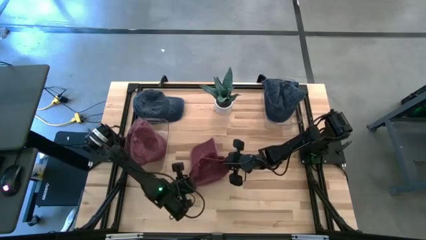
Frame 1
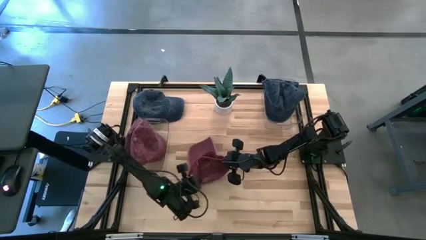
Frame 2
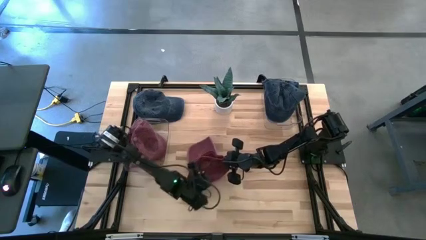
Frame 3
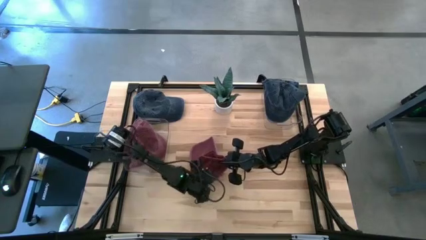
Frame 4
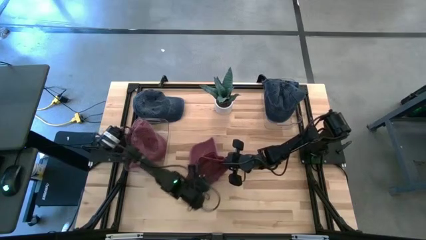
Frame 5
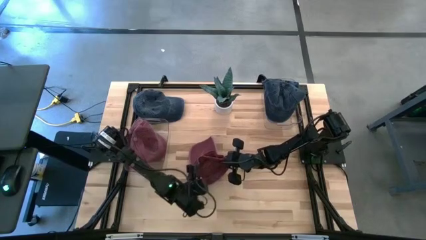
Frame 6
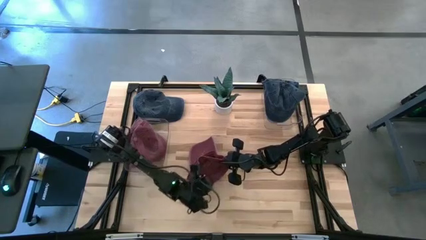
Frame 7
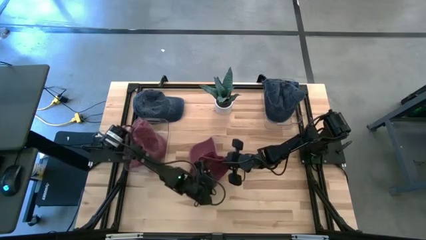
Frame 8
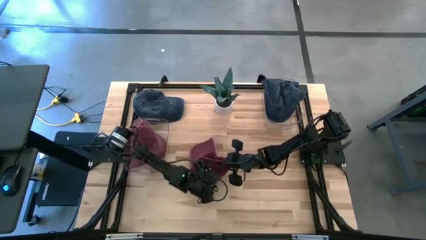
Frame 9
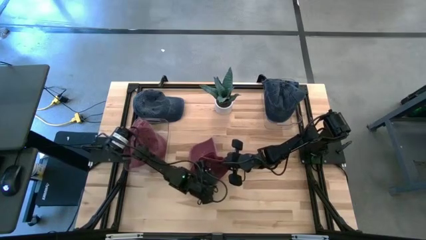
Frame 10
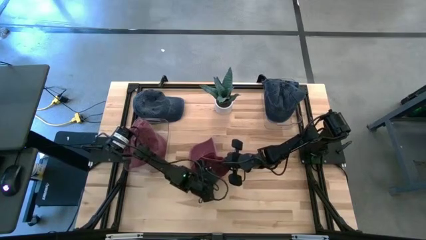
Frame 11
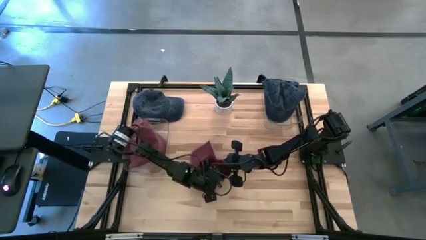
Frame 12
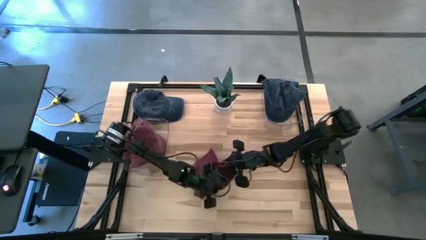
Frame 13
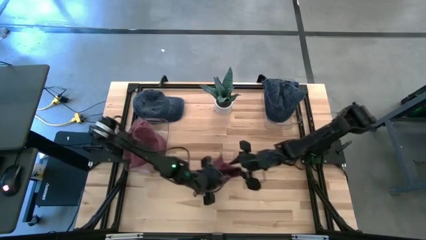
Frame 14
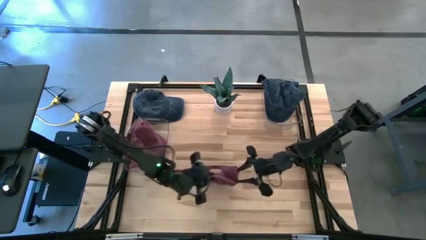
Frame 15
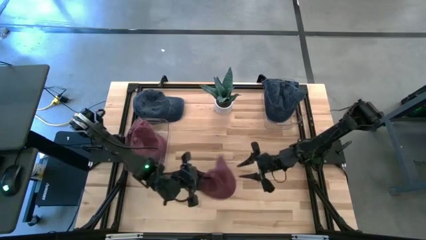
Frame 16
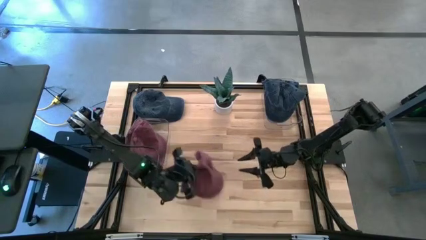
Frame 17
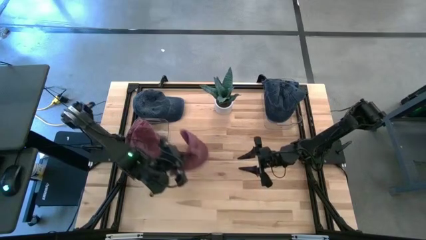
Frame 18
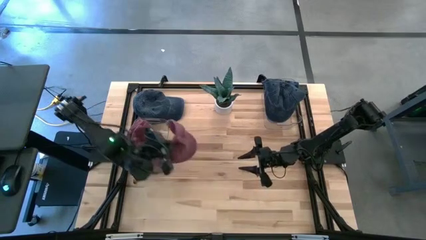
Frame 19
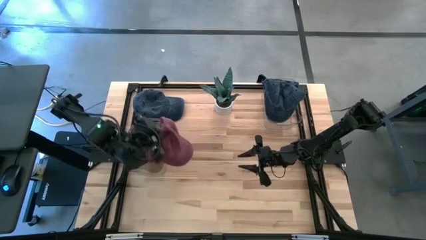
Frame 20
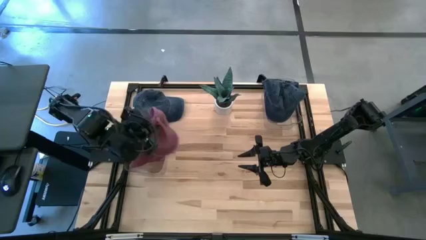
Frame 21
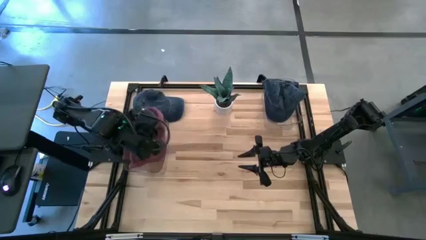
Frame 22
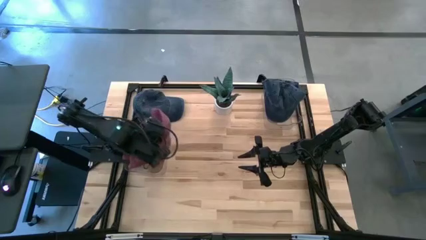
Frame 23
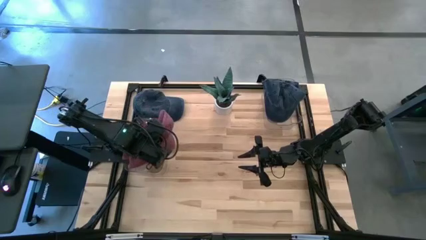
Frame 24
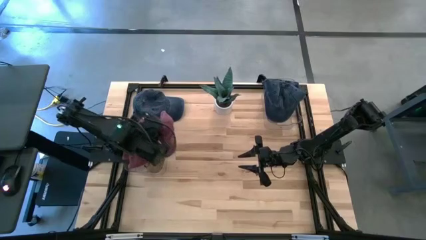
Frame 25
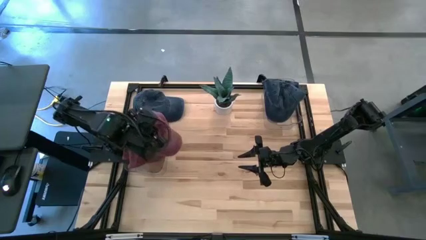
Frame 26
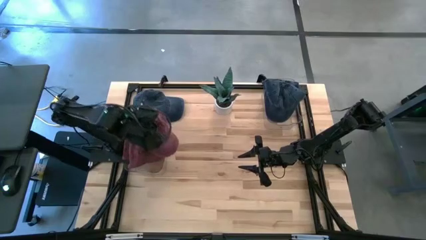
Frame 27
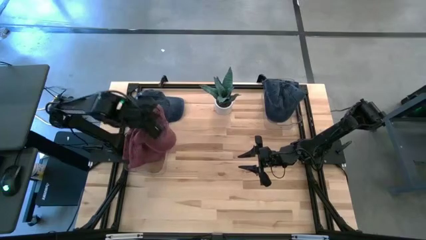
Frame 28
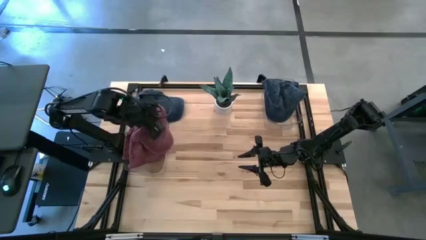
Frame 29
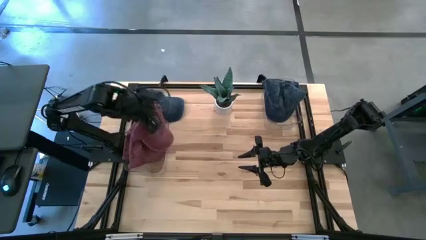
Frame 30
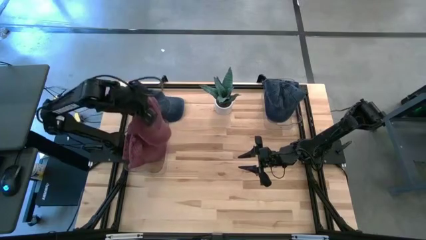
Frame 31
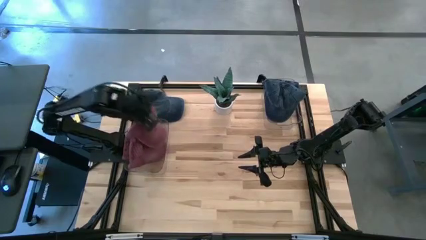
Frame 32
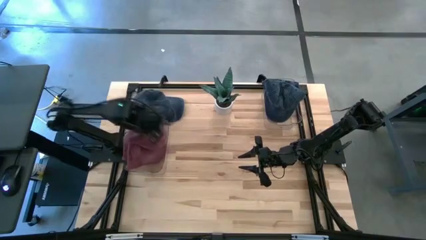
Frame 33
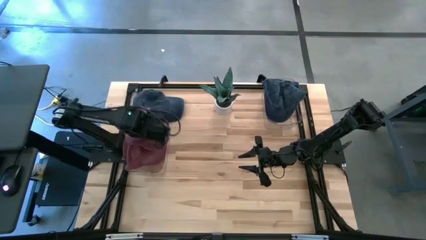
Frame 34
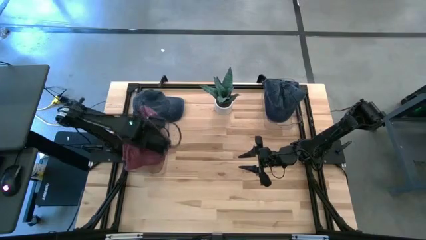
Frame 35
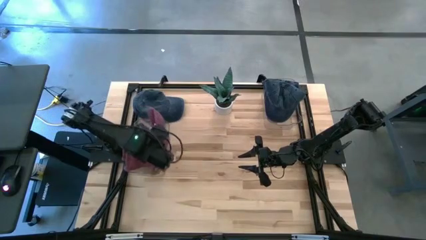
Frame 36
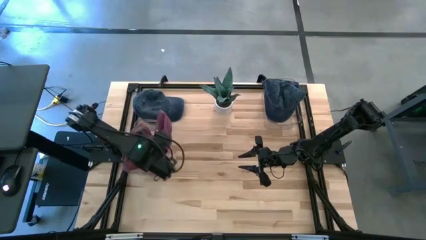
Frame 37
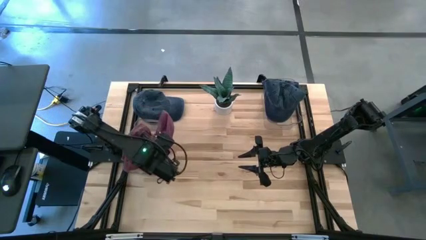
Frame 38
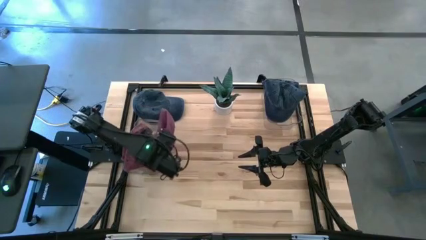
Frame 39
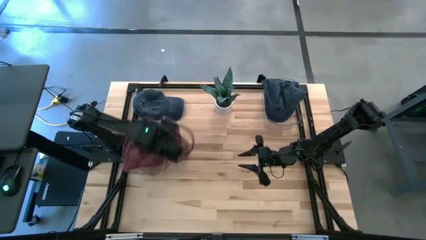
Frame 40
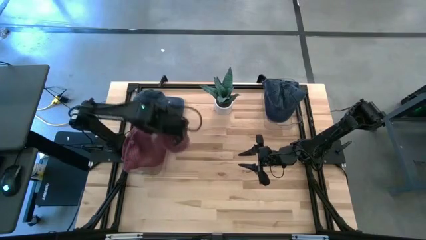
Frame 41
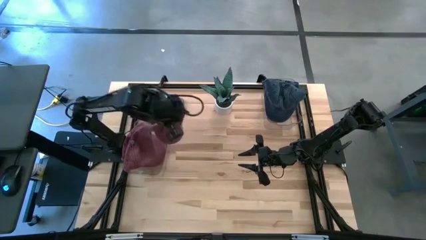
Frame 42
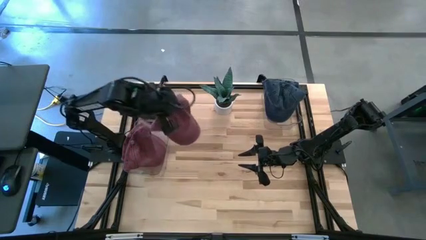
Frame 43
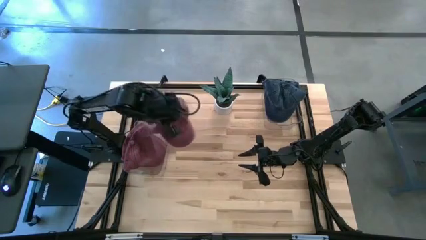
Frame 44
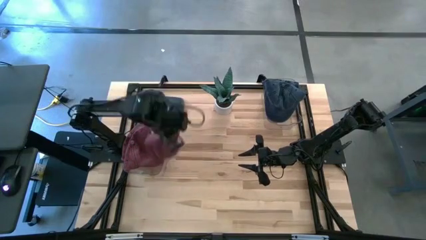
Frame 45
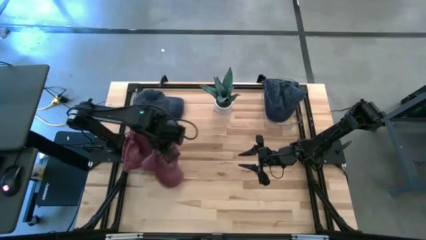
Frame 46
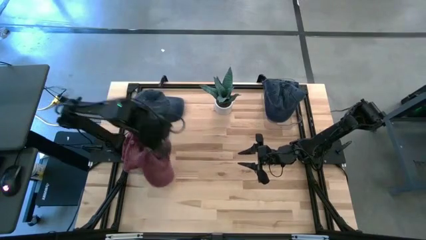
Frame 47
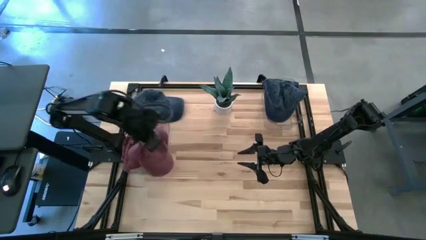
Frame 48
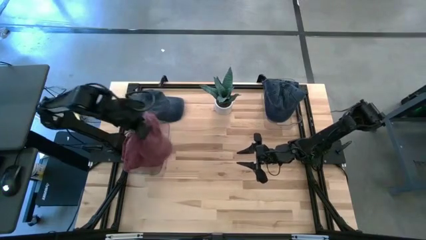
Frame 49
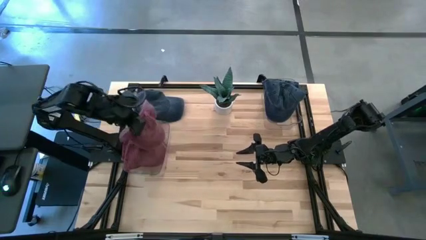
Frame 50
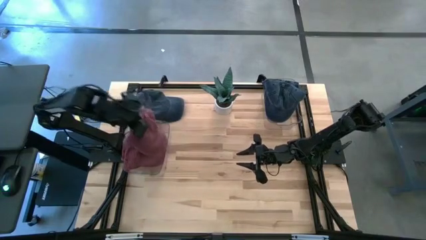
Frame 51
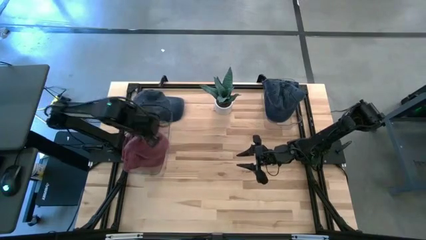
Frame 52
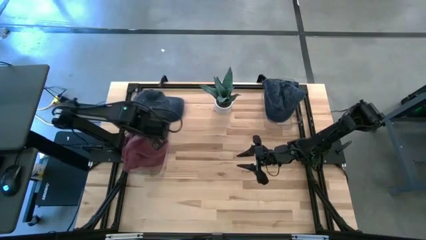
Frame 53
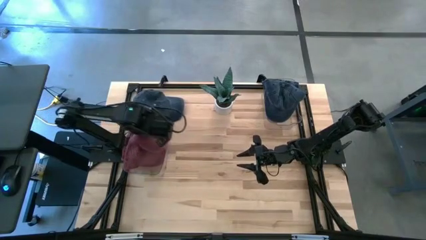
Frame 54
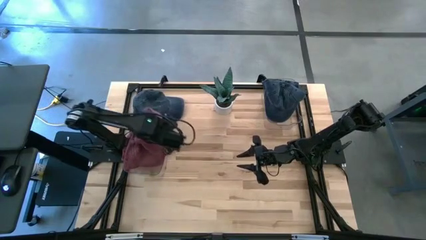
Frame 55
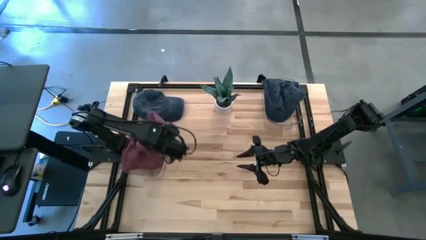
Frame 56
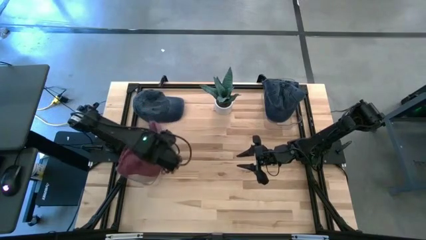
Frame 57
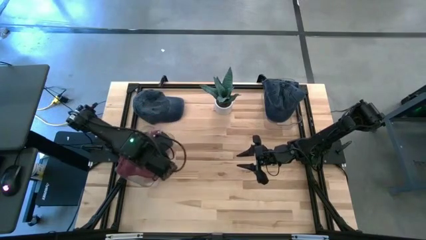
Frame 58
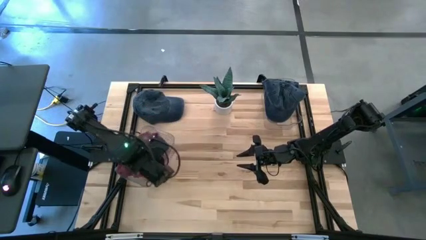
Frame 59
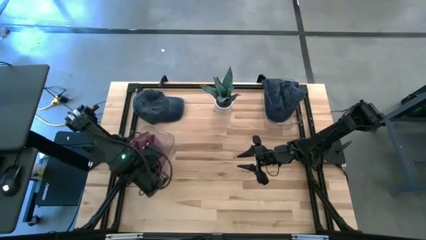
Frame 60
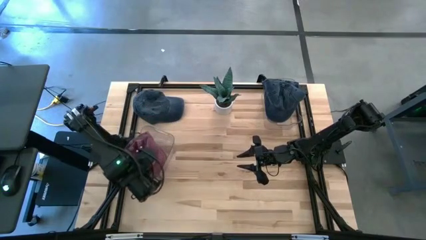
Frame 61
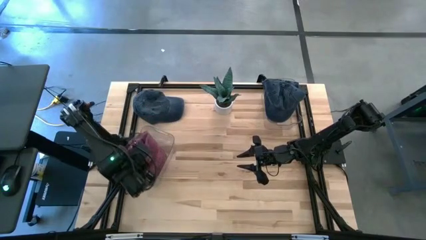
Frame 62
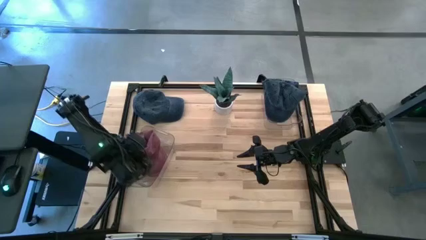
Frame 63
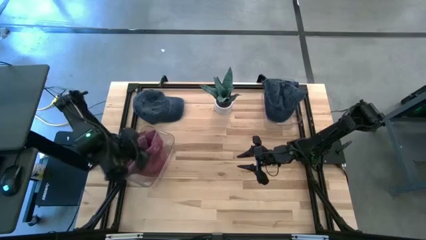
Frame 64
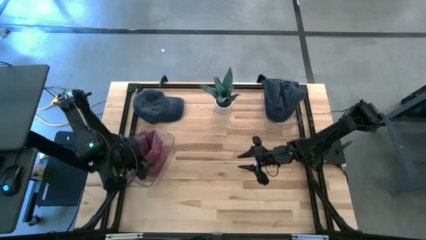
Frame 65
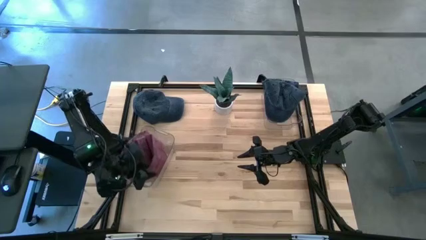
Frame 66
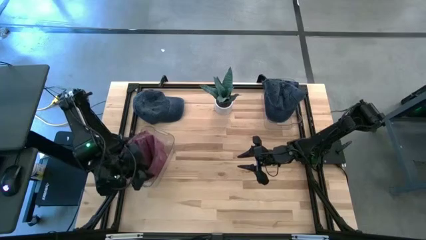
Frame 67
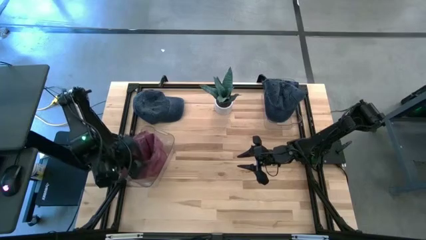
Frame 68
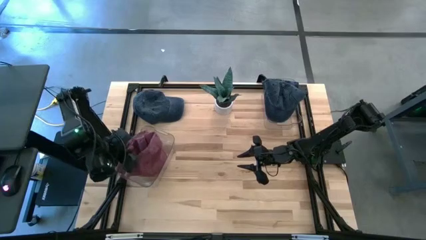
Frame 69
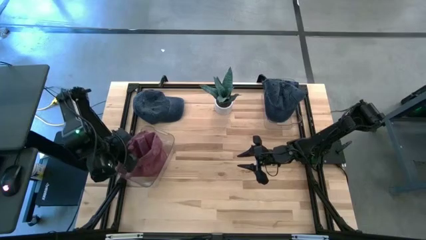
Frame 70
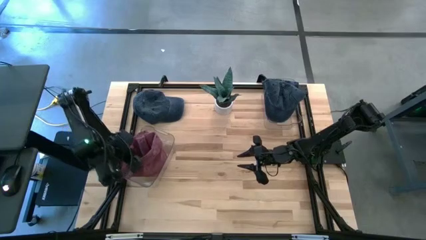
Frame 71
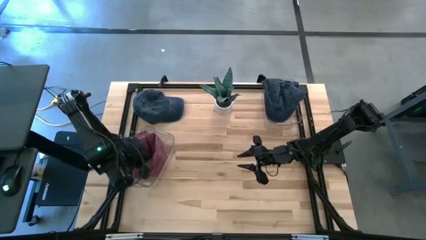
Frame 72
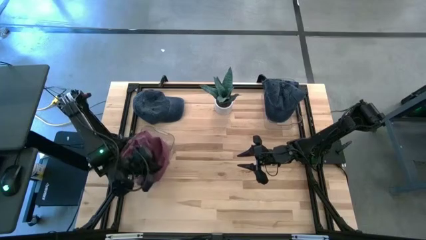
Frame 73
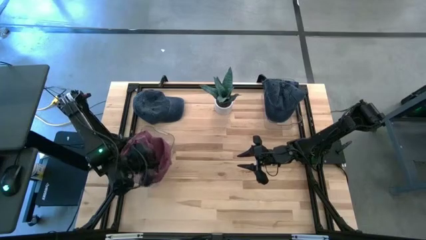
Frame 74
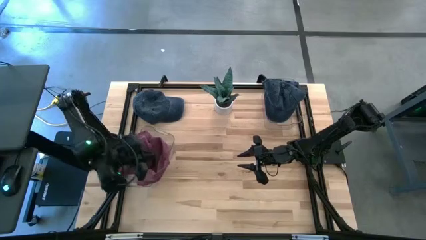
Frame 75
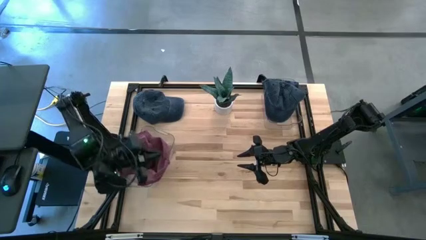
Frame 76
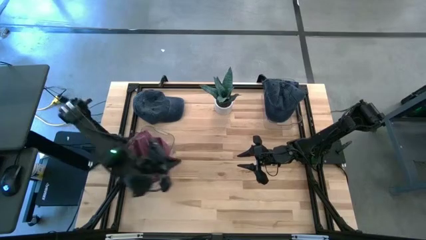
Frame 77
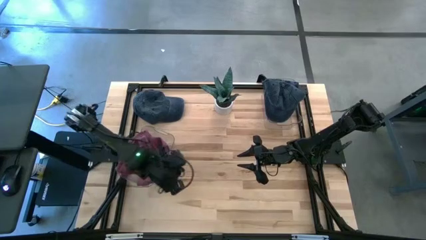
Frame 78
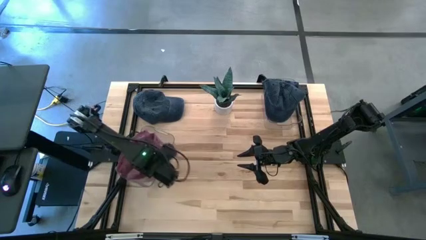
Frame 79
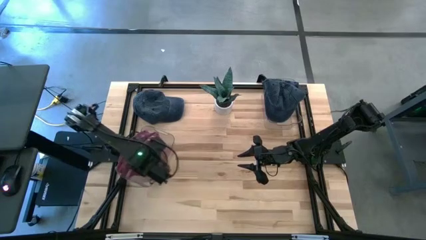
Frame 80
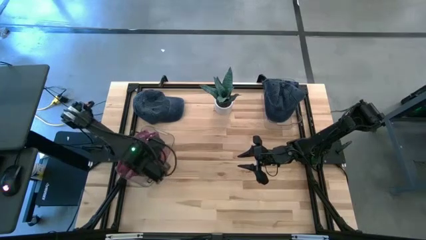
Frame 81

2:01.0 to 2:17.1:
Task: Pick & Place hat
Put the red cap into the left transparent bin

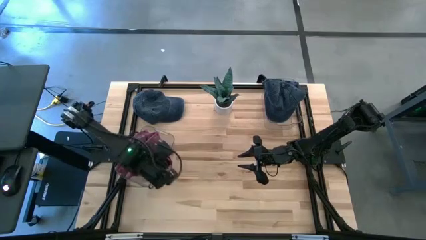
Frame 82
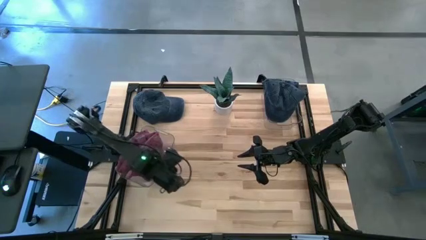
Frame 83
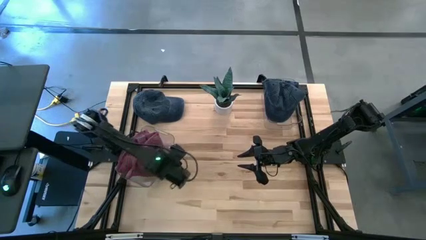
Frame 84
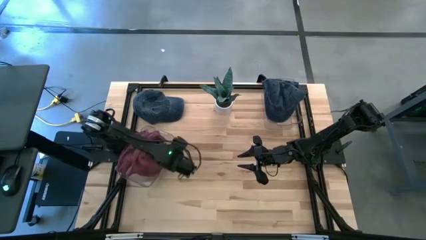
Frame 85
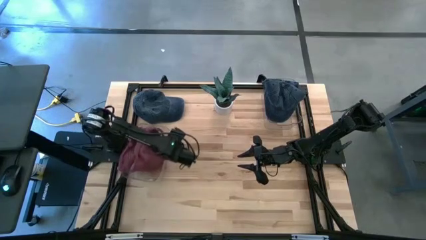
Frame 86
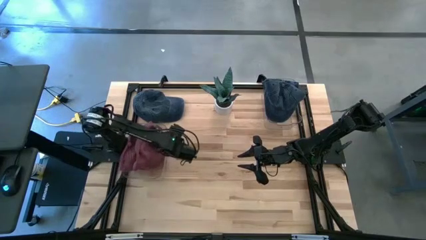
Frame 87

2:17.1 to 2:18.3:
Adjust the left transparent bin

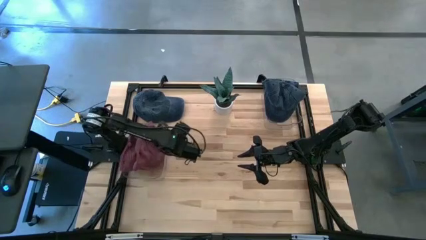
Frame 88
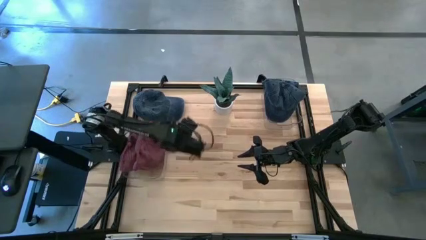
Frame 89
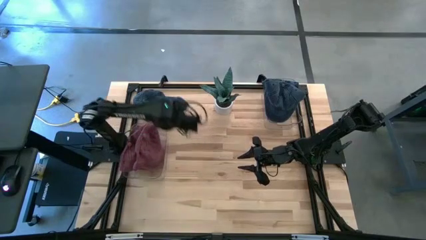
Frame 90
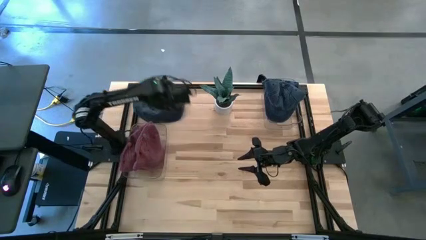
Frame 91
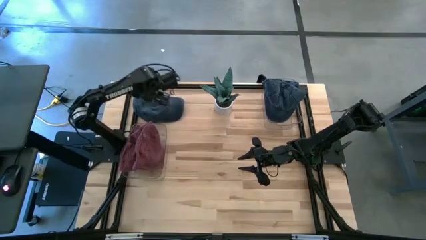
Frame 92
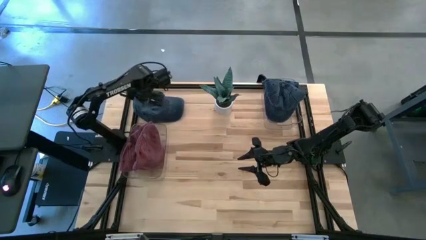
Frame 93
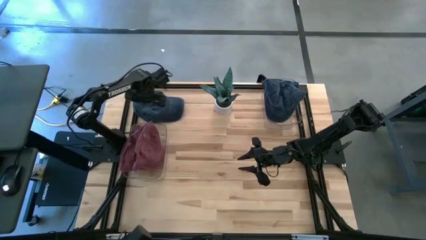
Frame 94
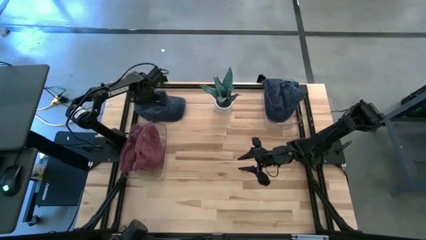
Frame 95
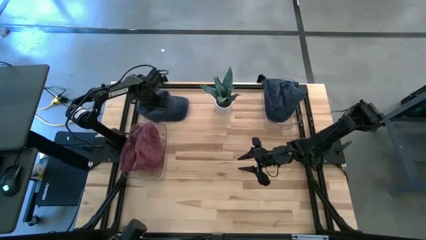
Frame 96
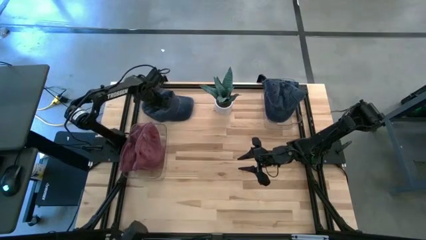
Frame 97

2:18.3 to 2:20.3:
Put the blue cap into the right transparent bin
